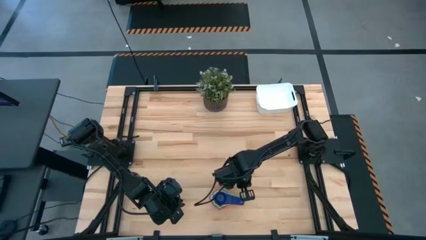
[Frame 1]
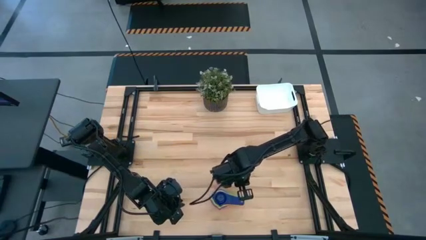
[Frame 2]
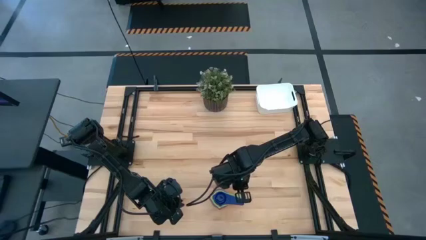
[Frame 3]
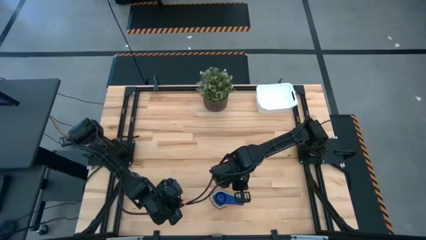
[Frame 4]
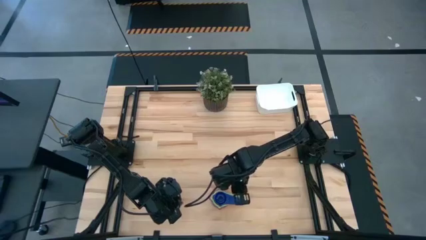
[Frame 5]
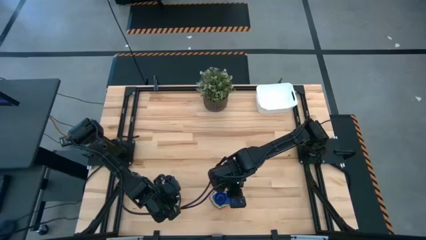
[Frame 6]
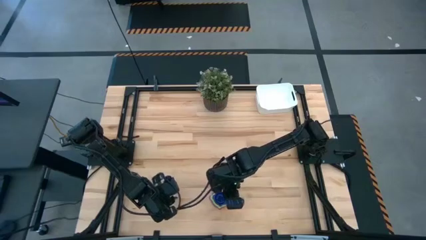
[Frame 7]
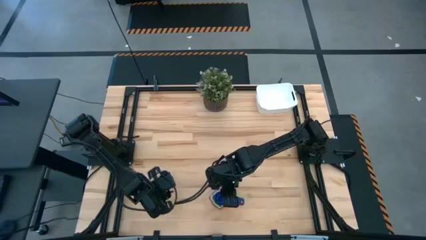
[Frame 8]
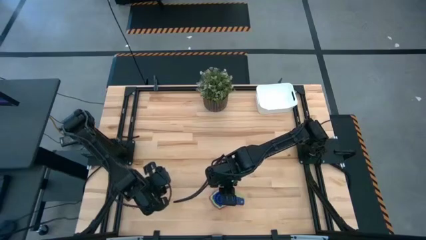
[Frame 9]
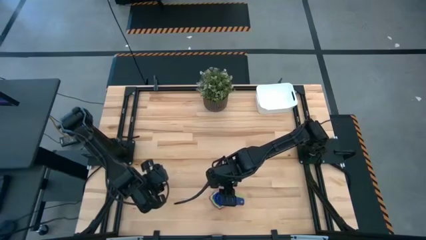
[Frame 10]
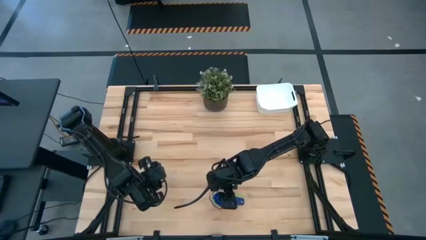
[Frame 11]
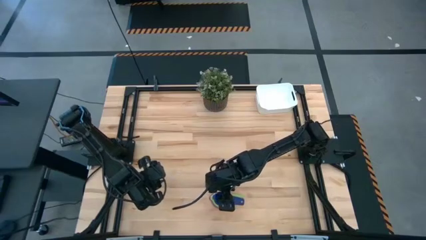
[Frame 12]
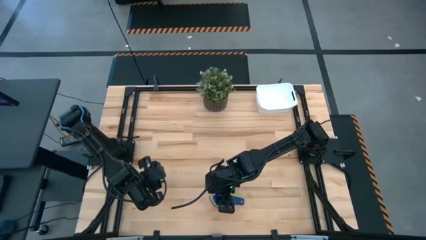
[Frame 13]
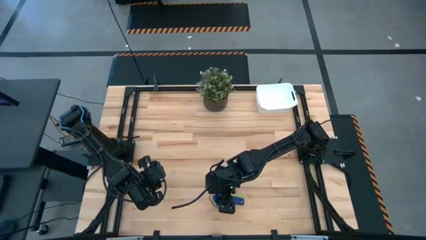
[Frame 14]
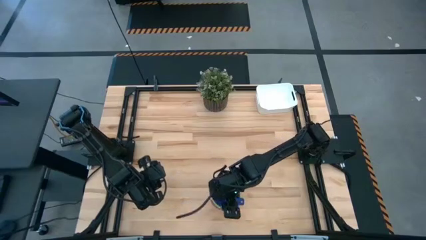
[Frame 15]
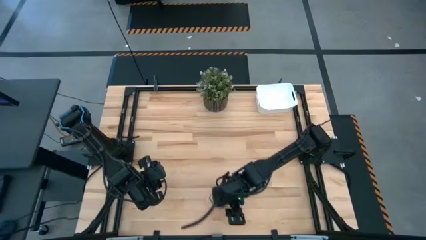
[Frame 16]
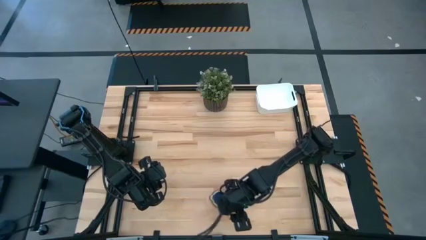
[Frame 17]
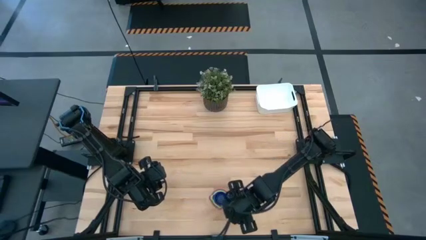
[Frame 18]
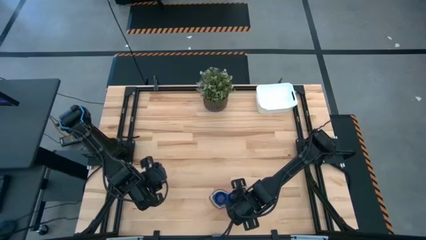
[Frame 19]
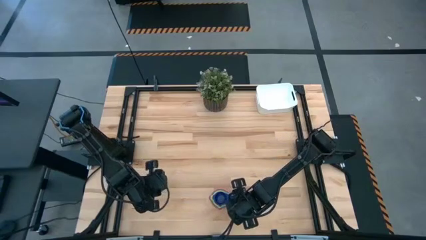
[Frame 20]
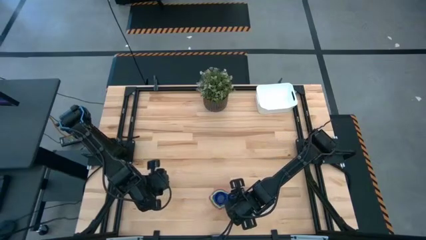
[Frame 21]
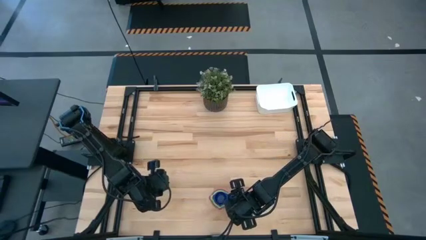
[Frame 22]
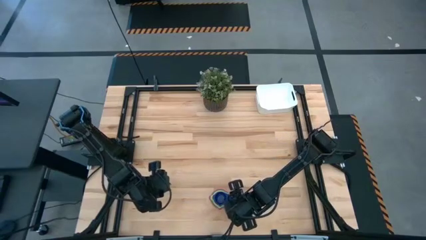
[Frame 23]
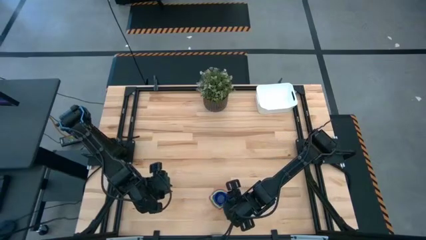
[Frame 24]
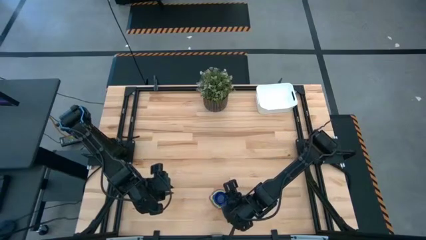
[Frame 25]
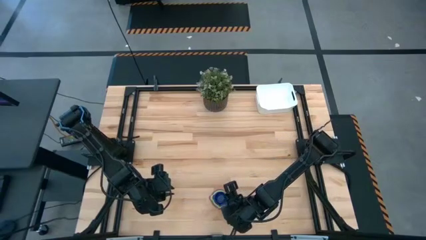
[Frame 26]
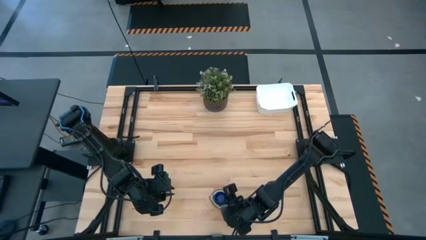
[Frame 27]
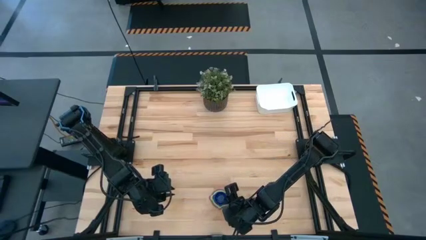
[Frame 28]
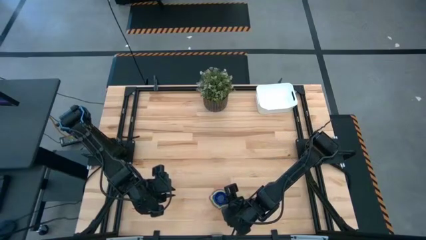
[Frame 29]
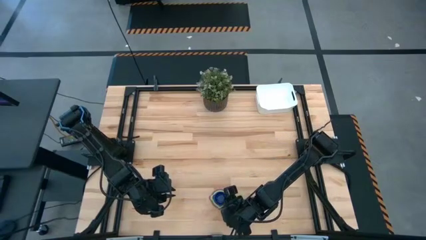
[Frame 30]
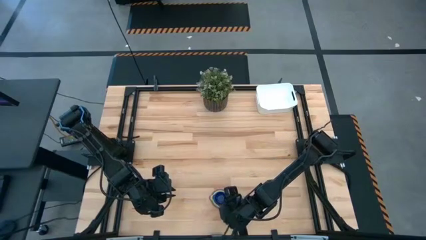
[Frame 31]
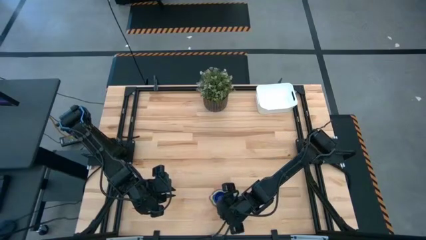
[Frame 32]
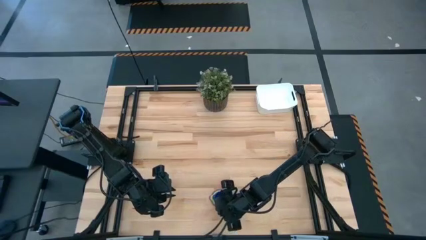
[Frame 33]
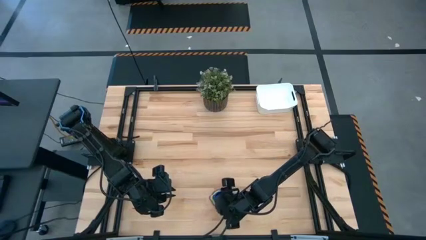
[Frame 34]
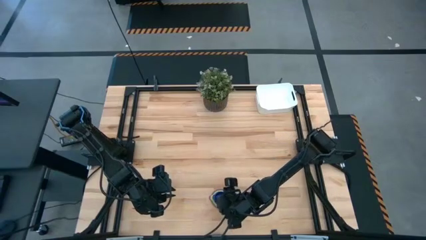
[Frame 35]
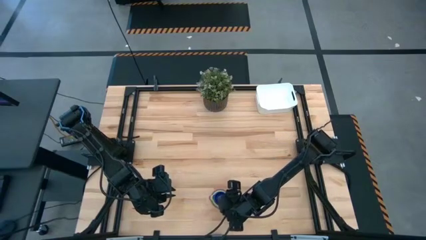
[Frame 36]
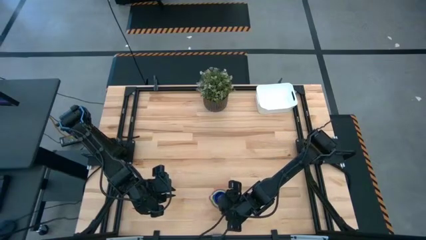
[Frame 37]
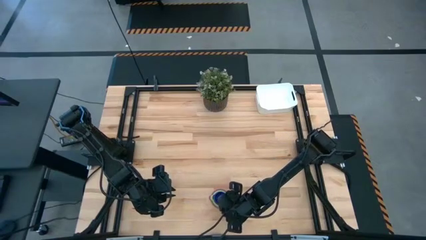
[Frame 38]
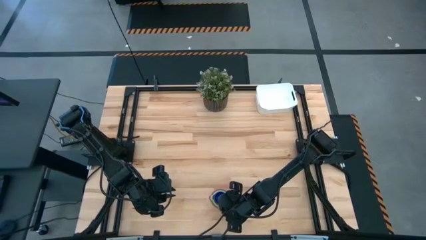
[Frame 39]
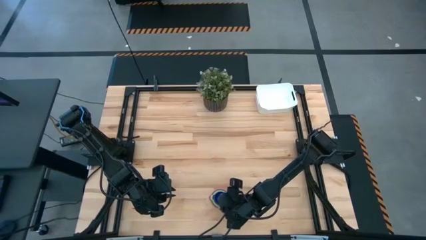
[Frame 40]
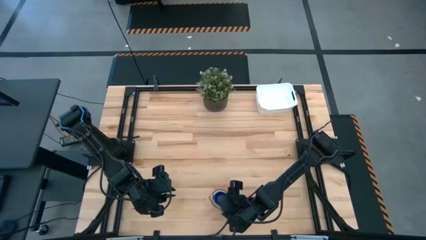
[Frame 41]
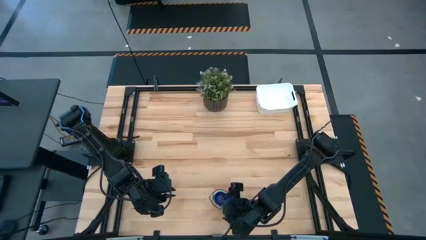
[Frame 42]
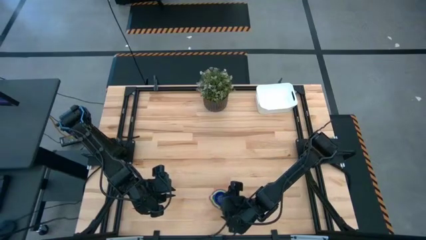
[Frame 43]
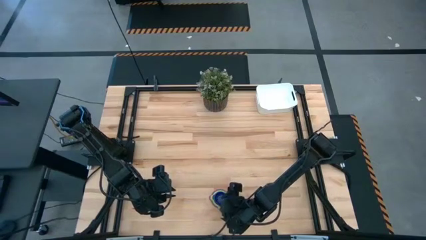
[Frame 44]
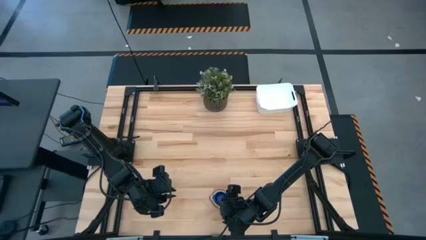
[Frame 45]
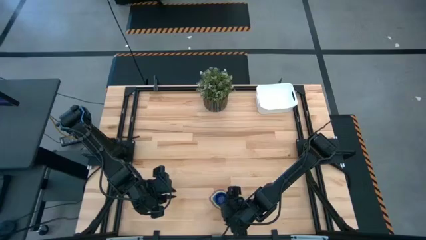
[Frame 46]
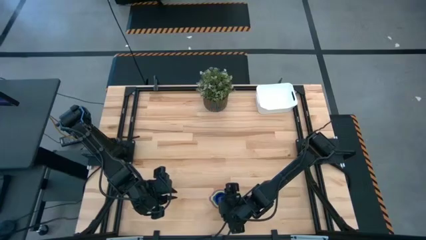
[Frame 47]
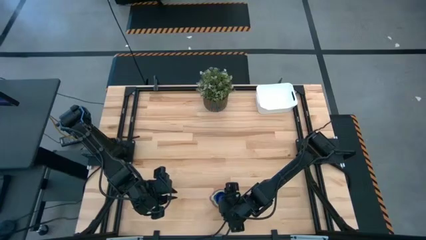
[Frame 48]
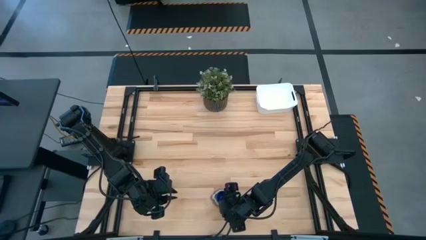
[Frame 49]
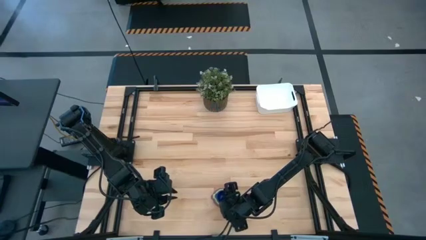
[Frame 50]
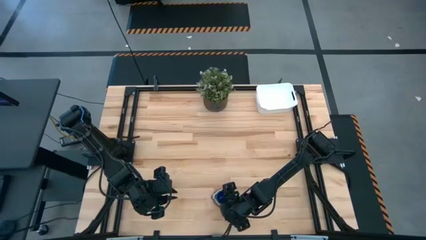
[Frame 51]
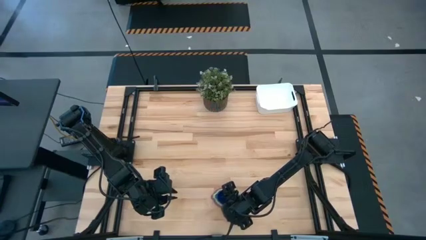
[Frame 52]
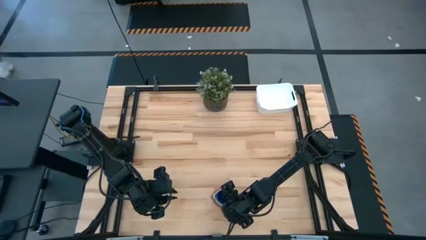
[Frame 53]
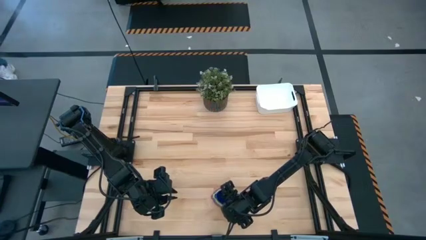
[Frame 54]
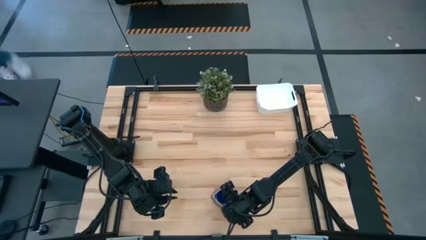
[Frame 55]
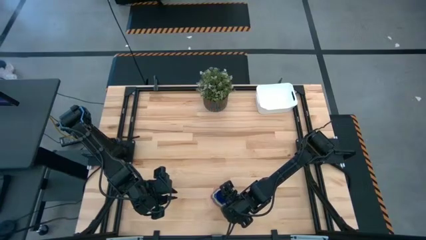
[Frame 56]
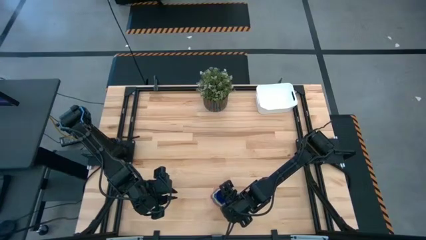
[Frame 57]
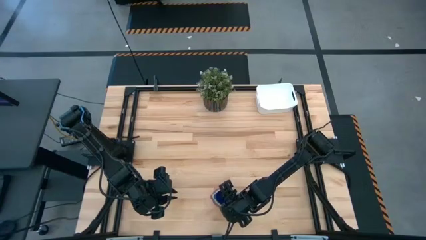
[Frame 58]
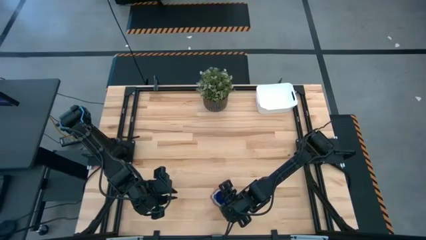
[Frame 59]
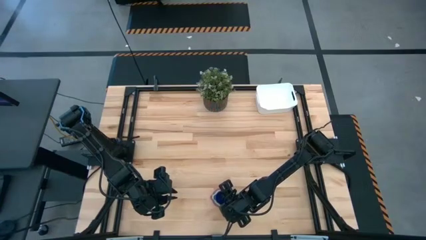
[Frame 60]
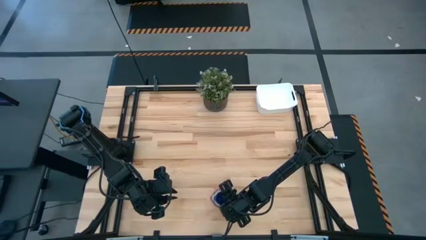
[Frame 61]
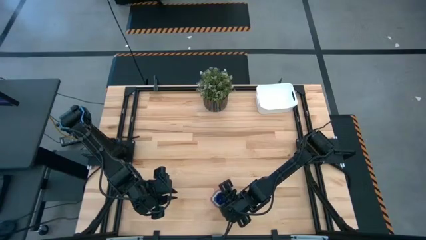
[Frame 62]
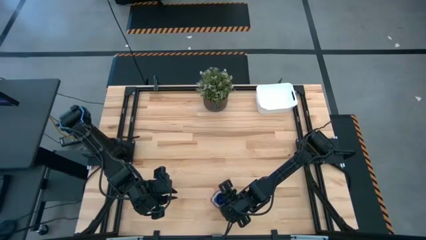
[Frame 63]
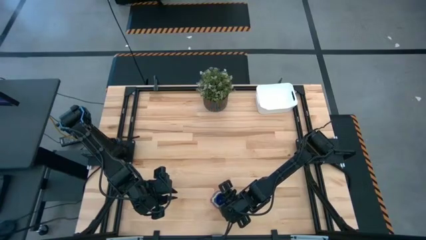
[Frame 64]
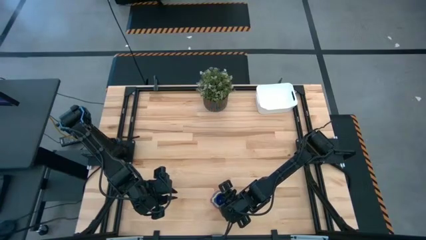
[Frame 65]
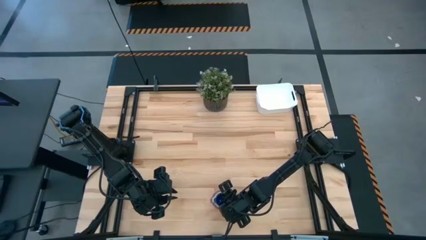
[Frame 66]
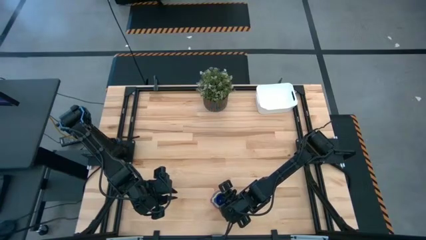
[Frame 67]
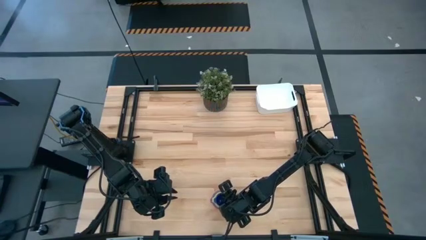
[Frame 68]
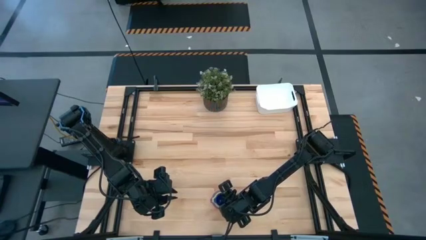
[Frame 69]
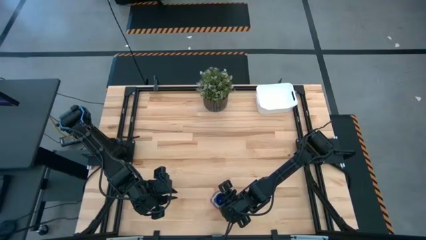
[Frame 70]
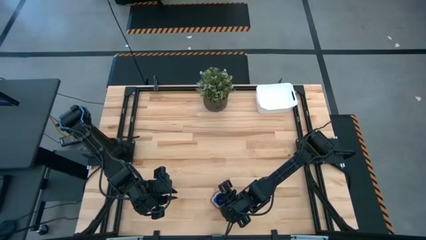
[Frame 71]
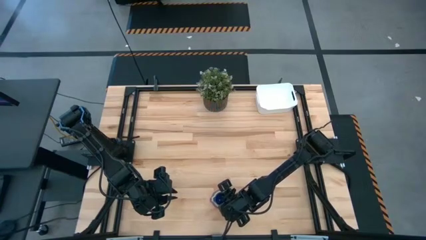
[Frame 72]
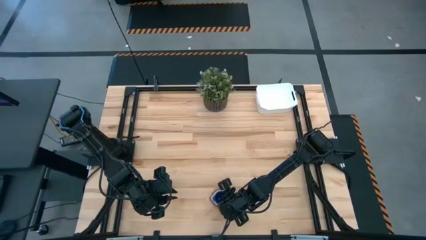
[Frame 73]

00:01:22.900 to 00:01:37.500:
Task: Nest measuring cups in basket
Put the stacked measuring cups into the white bin
